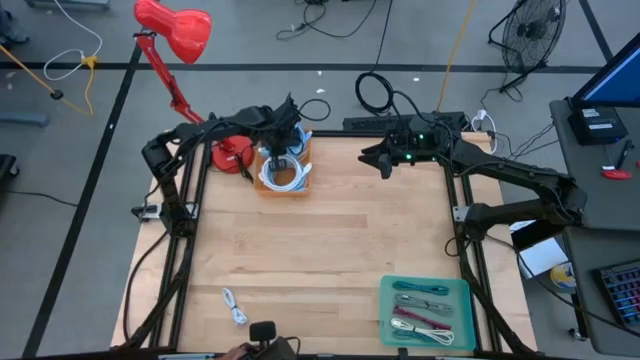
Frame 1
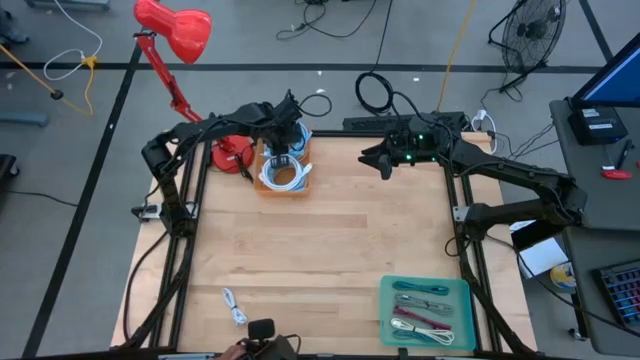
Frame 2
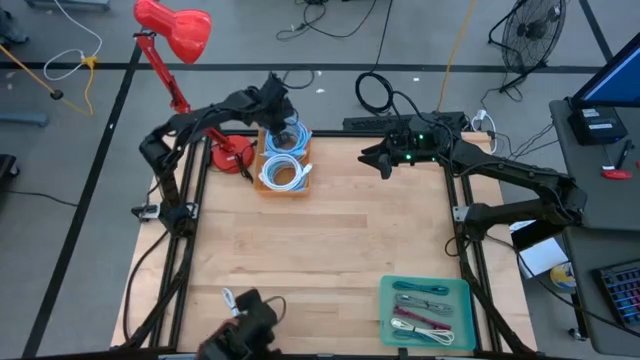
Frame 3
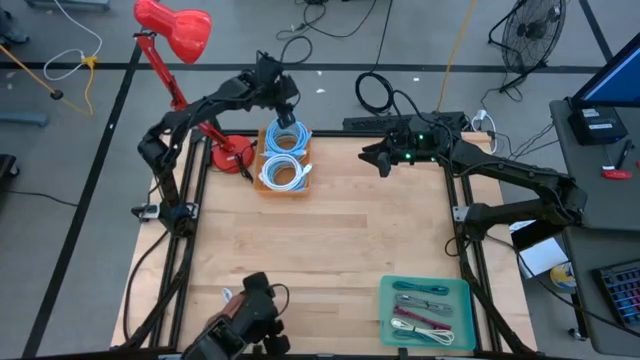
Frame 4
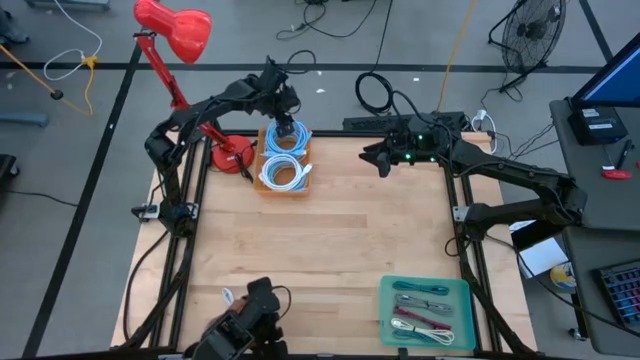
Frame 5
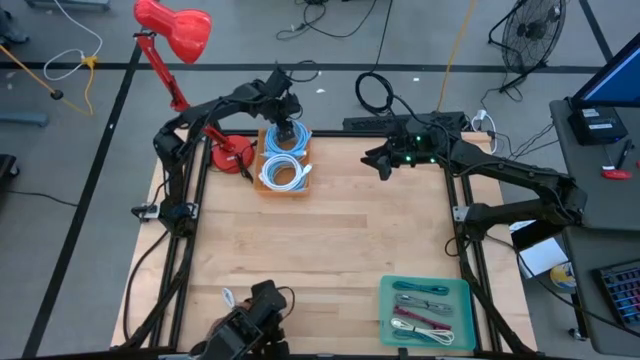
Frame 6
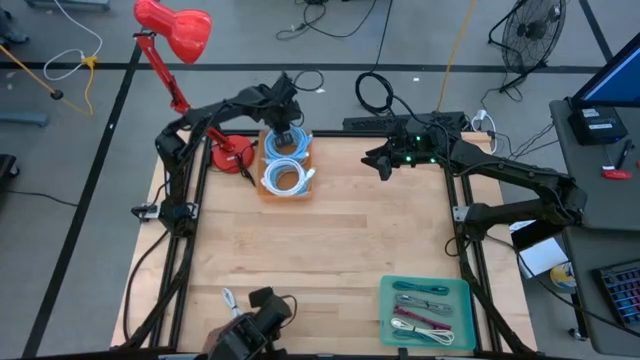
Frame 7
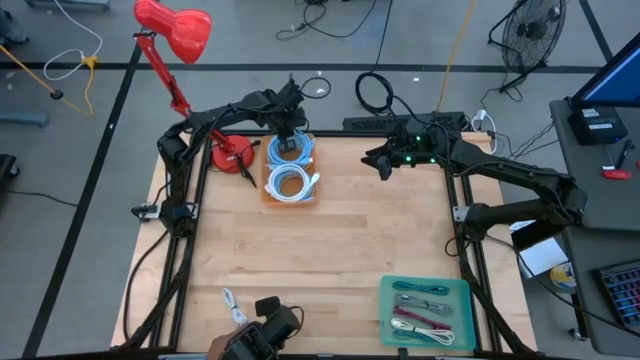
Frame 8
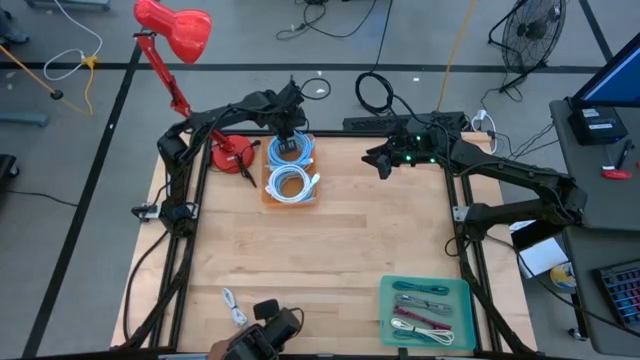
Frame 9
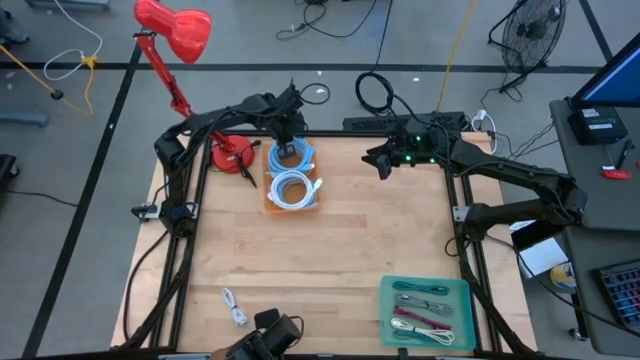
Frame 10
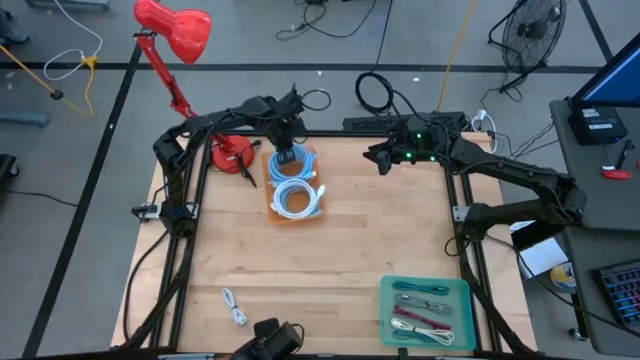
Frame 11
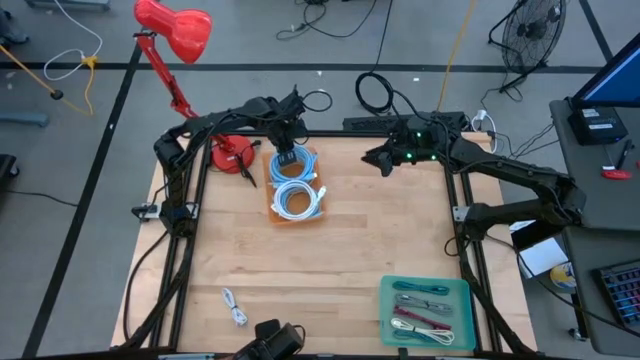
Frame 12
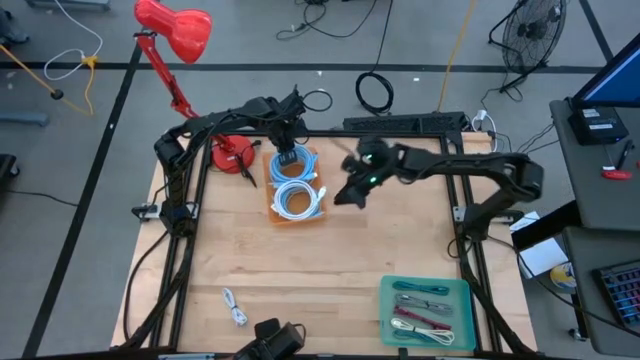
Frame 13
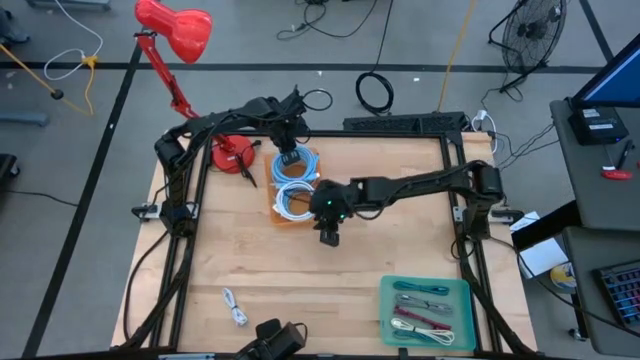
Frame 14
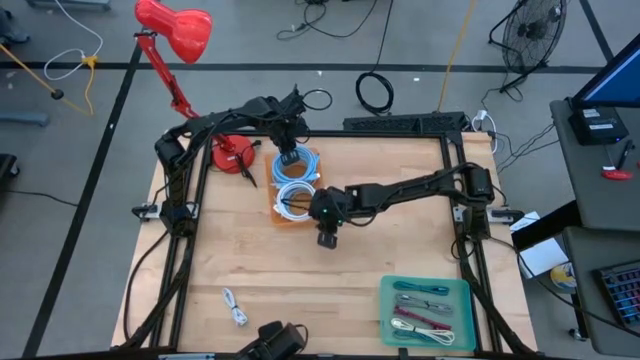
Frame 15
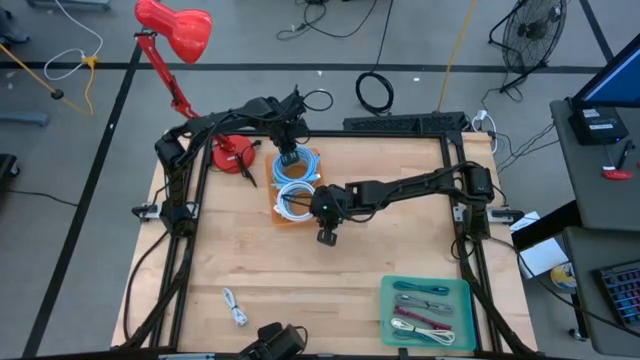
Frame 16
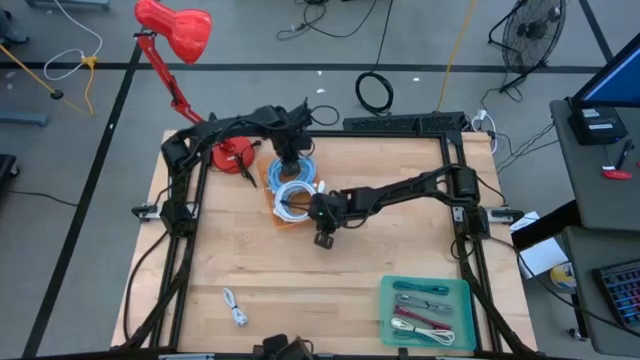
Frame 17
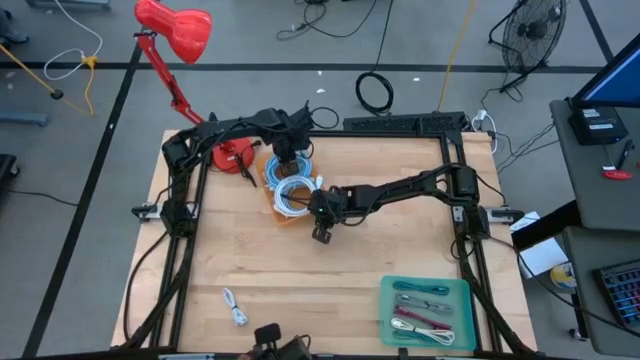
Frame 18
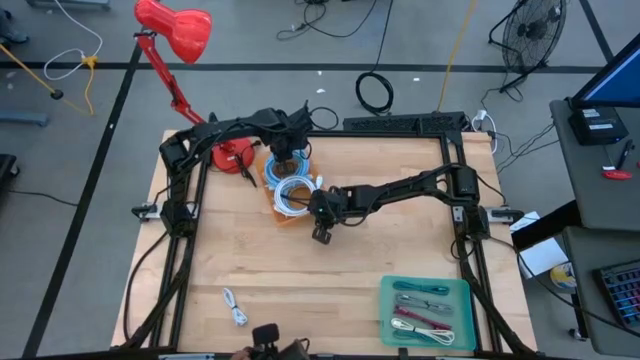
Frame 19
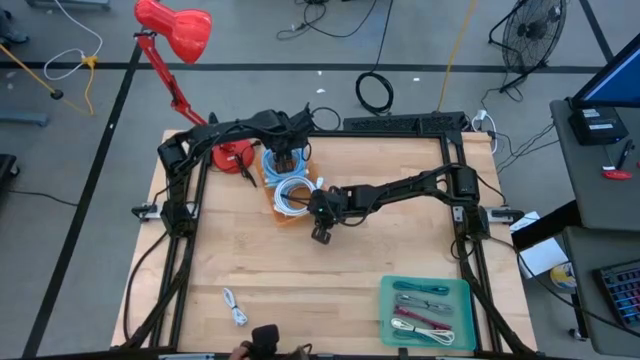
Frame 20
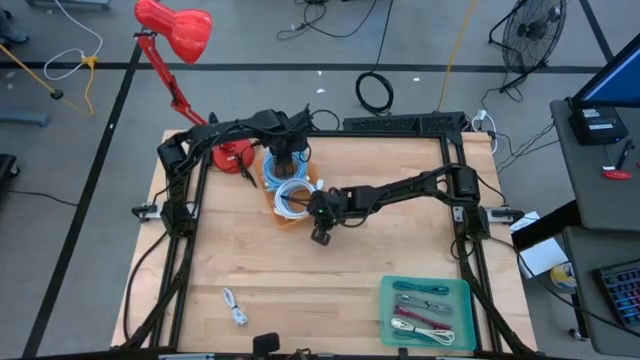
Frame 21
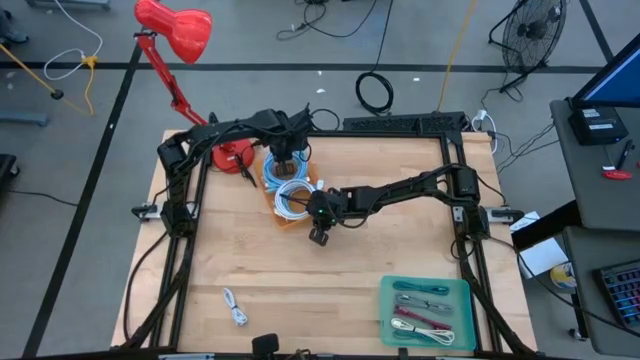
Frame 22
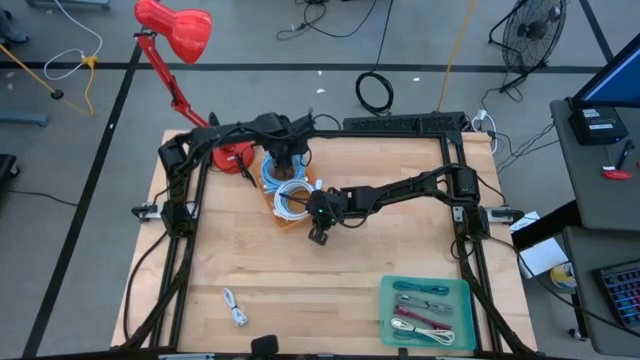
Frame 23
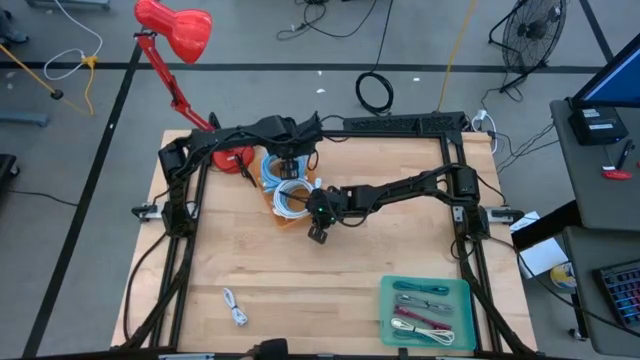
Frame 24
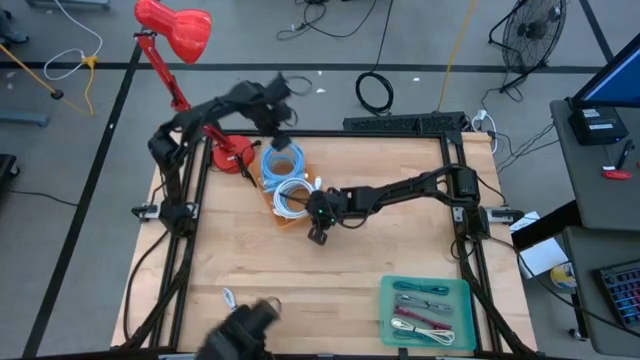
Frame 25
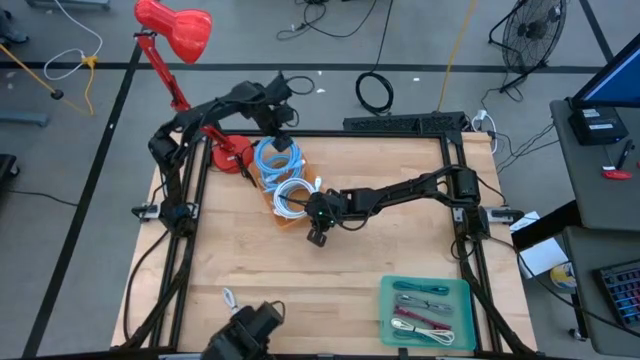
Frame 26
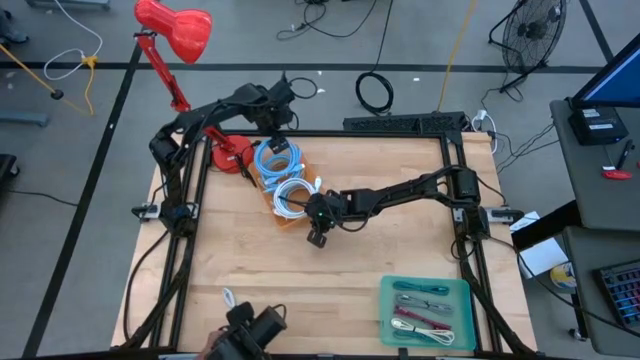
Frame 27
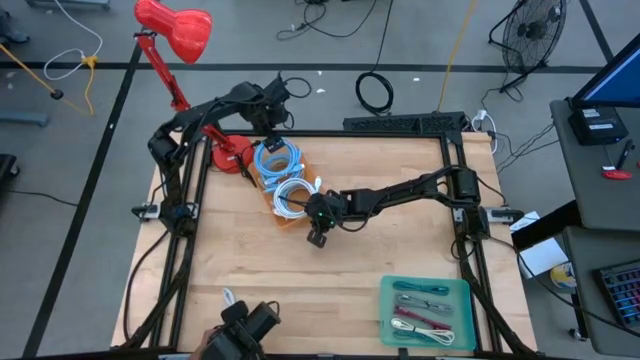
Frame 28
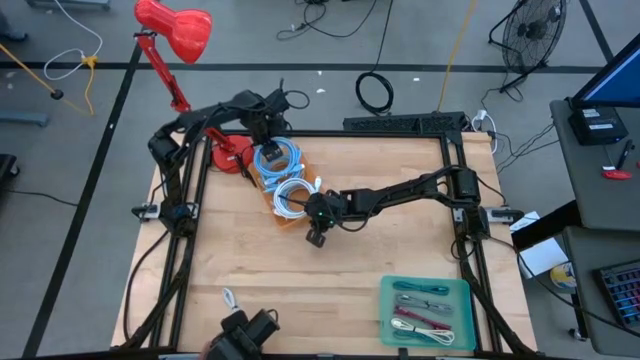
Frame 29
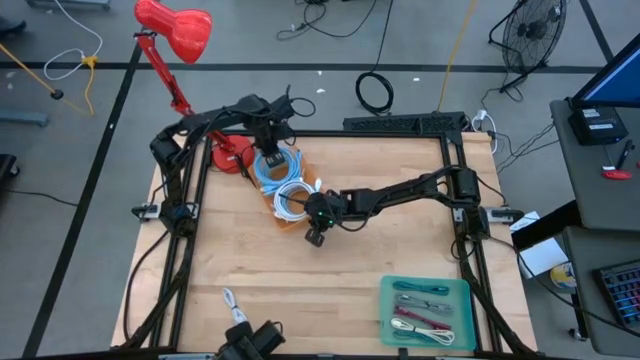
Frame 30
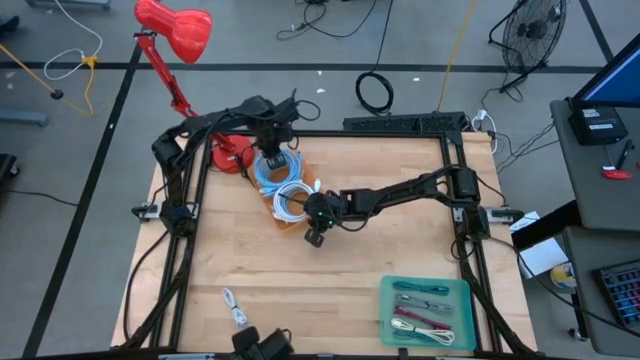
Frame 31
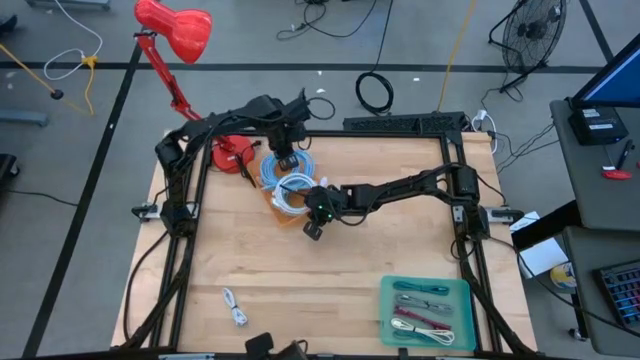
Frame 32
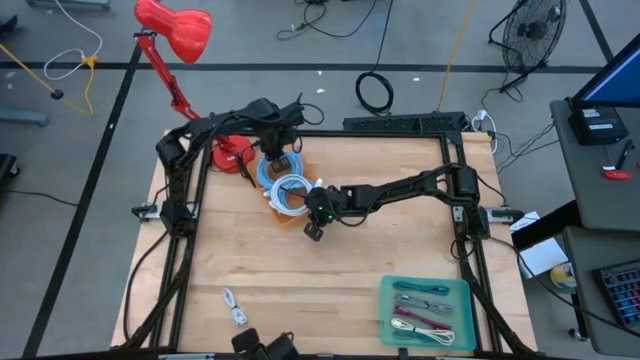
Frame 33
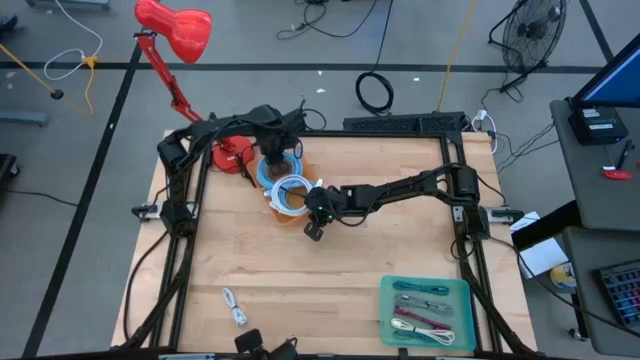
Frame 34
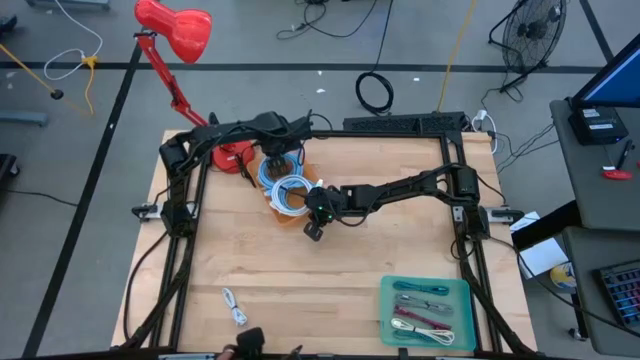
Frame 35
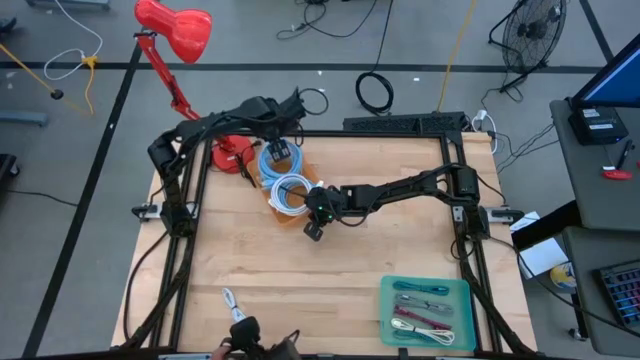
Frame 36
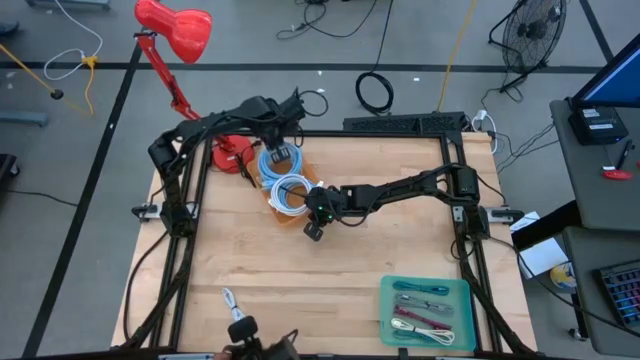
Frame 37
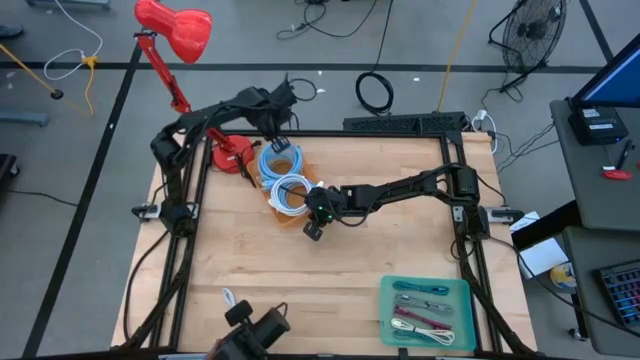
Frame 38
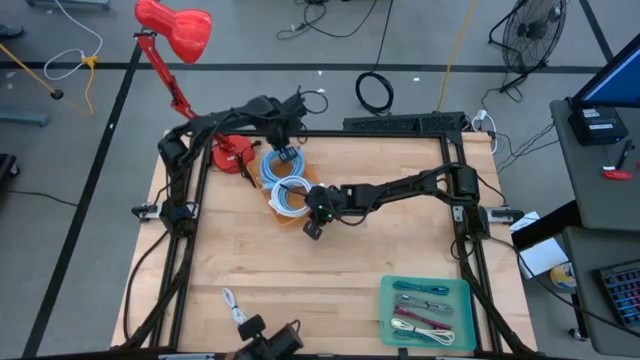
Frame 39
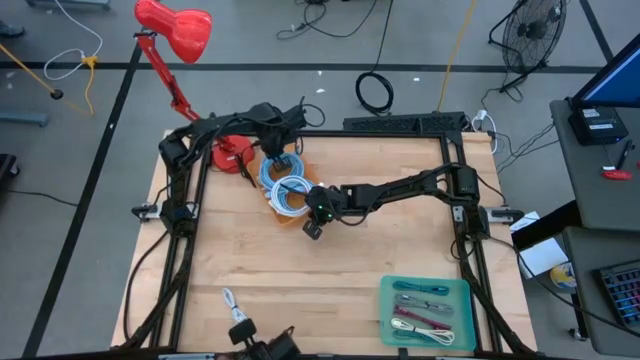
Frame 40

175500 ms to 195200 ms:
Task: Pick & Place USB Port
Put the light blue wire cable into the orange bin

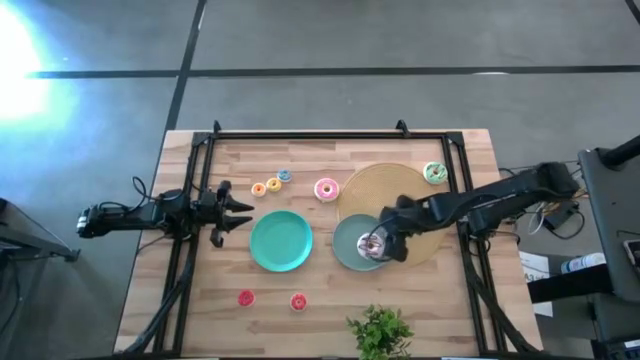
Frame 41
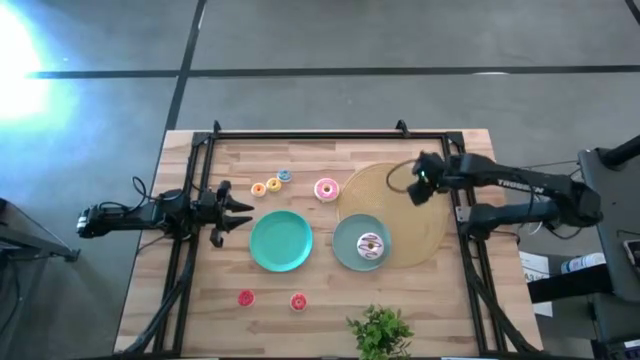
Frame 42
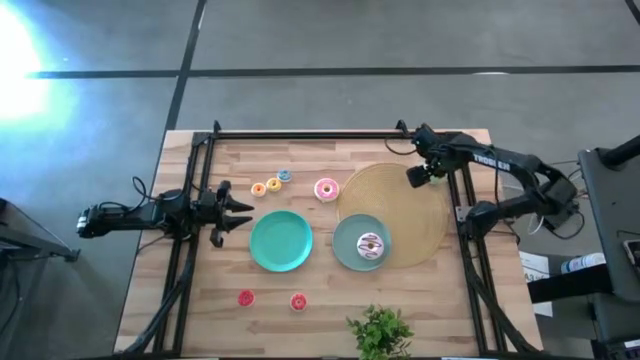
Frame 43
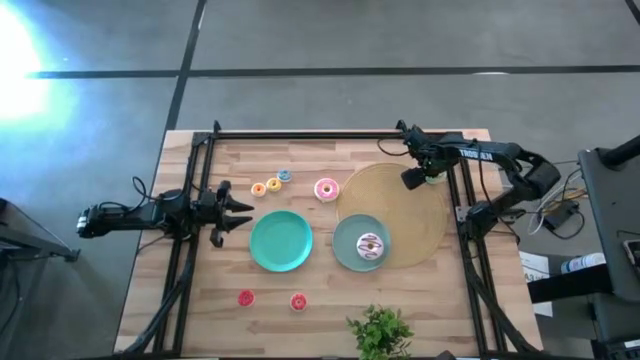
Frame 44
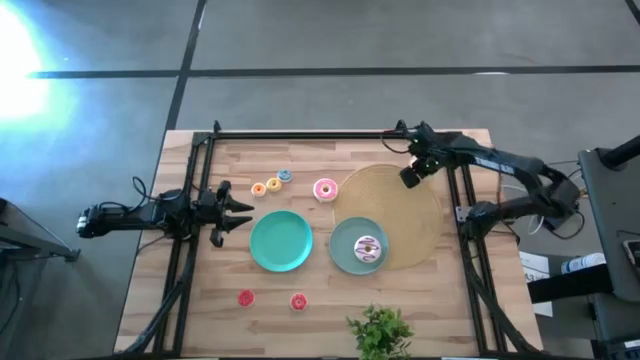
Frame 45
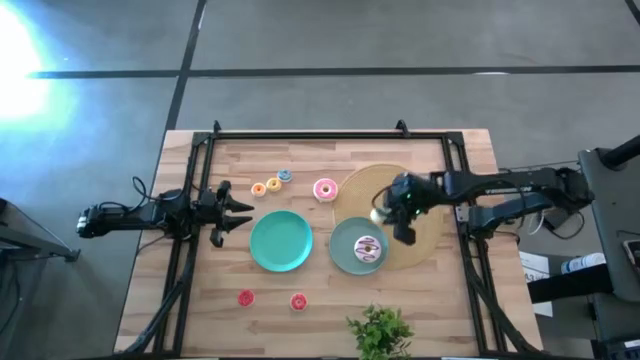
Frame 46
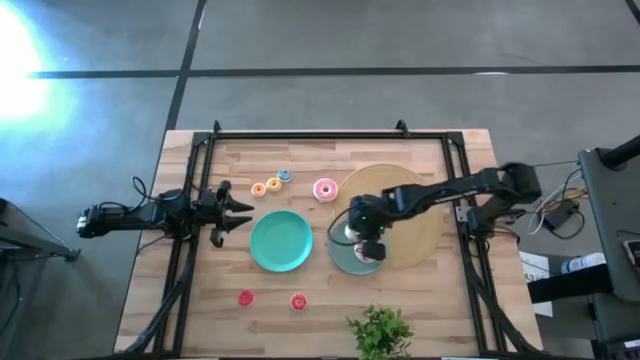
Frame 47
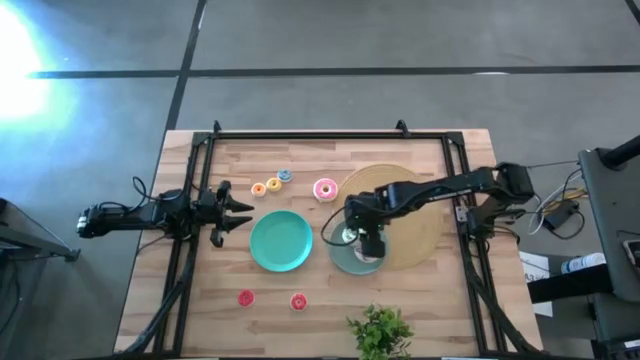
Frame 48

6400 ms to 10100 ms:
Task: Pick & Place donuts
Put the big blue donut on the light blue plate
